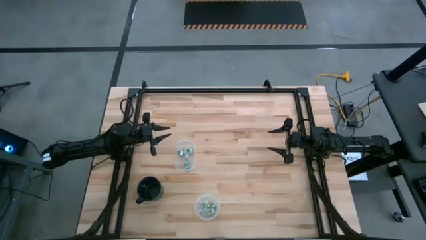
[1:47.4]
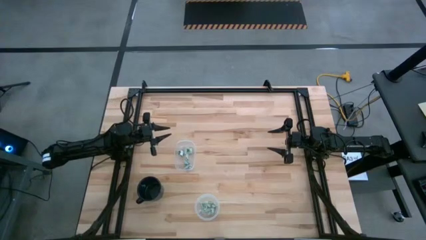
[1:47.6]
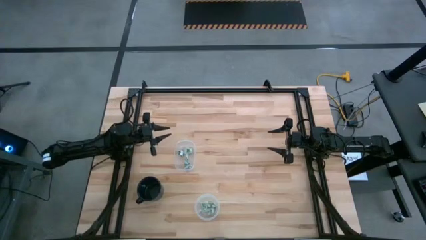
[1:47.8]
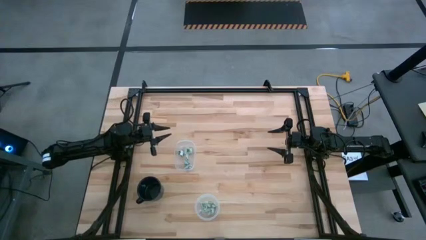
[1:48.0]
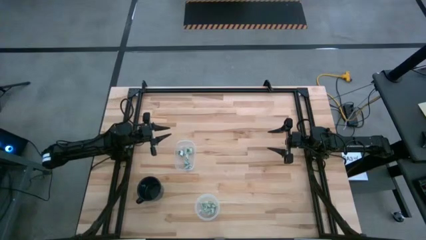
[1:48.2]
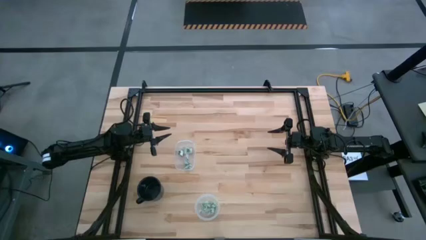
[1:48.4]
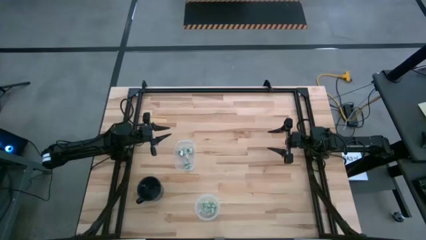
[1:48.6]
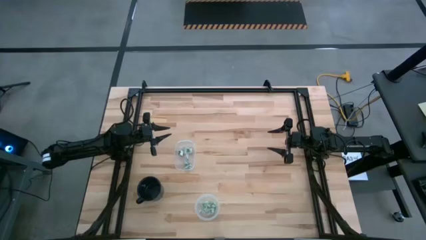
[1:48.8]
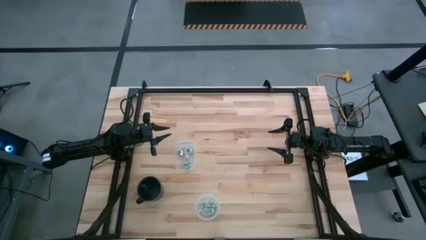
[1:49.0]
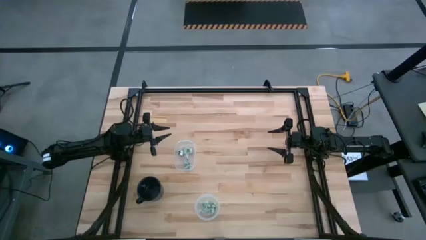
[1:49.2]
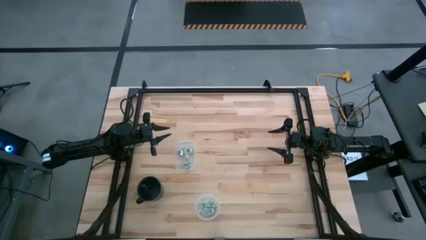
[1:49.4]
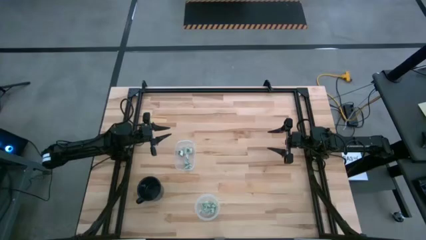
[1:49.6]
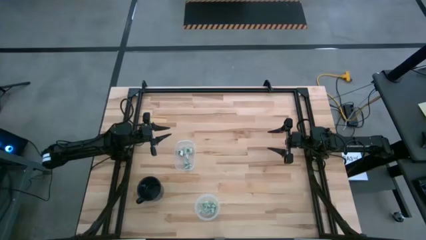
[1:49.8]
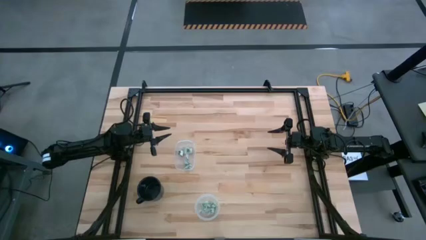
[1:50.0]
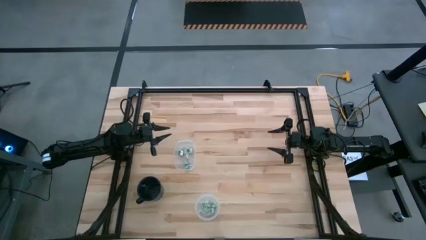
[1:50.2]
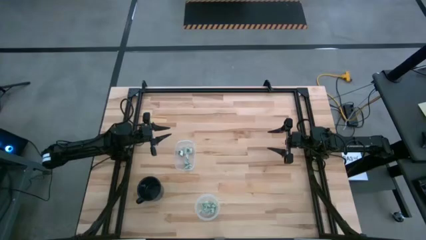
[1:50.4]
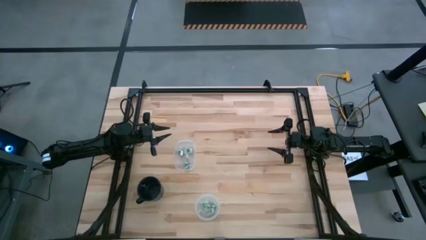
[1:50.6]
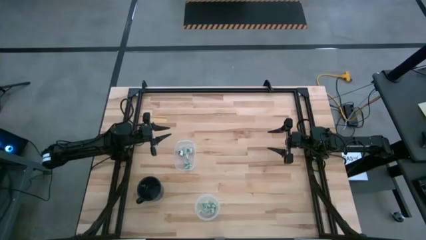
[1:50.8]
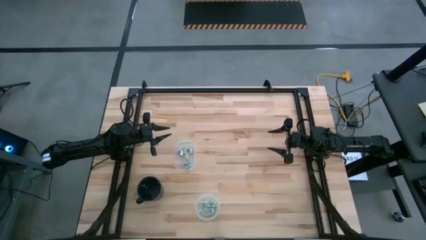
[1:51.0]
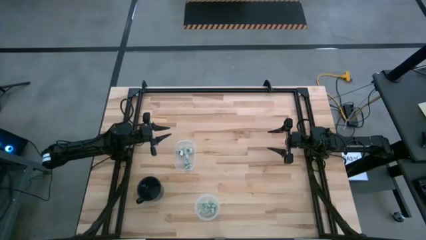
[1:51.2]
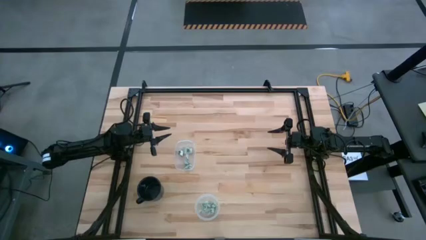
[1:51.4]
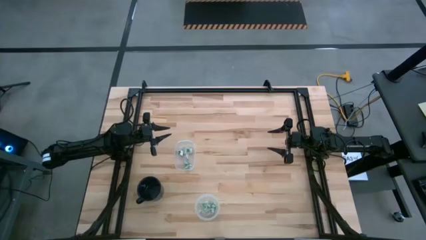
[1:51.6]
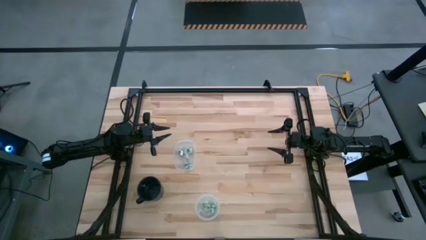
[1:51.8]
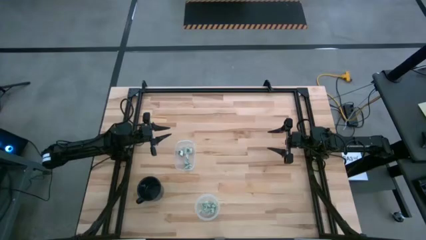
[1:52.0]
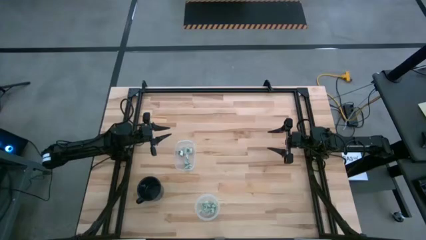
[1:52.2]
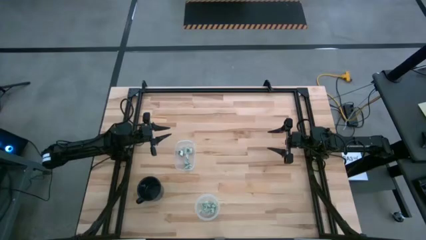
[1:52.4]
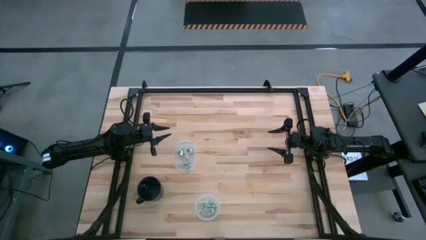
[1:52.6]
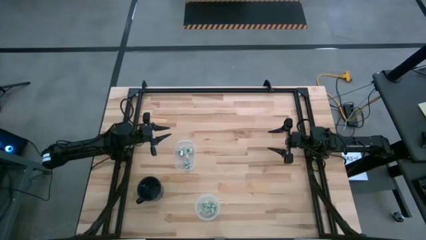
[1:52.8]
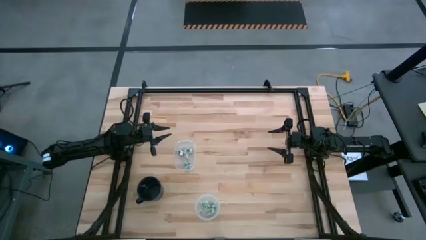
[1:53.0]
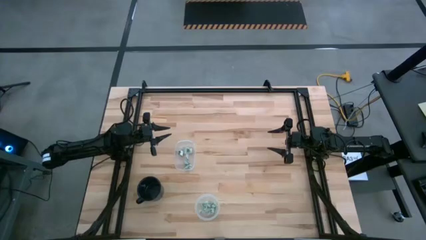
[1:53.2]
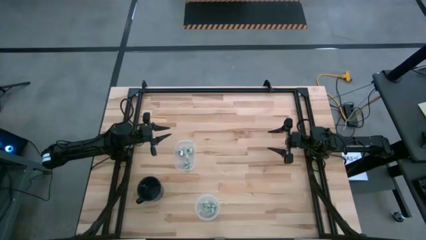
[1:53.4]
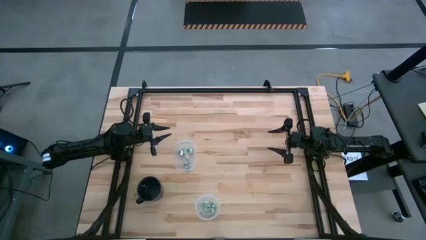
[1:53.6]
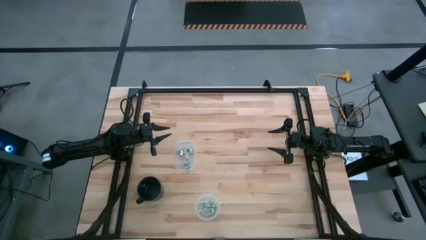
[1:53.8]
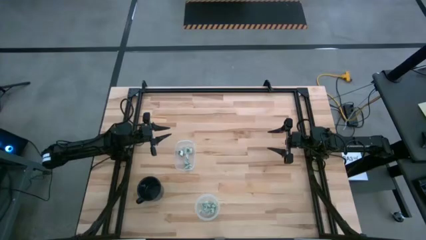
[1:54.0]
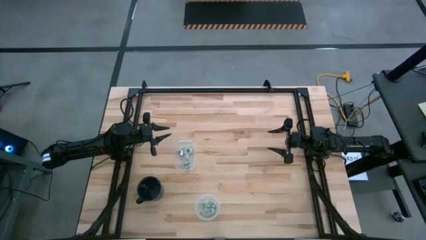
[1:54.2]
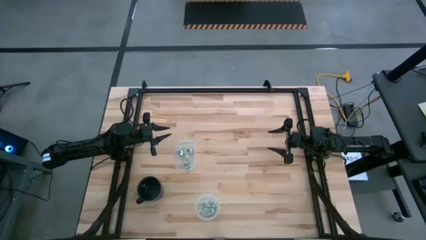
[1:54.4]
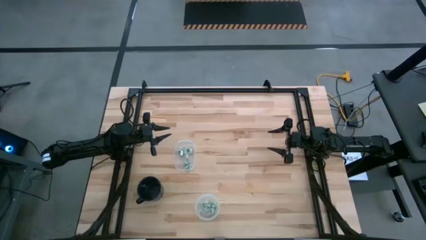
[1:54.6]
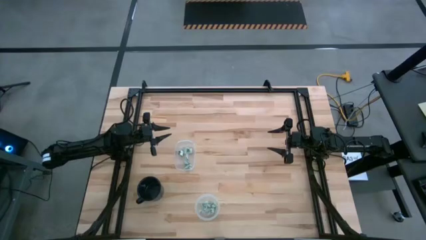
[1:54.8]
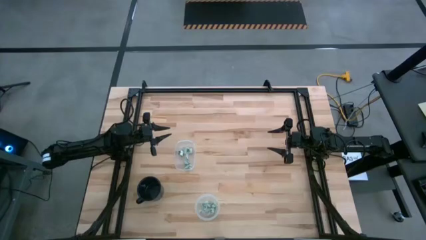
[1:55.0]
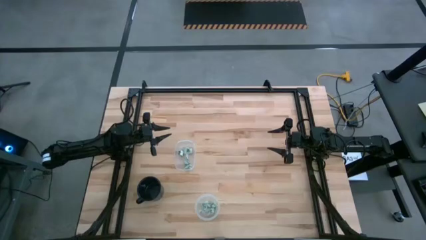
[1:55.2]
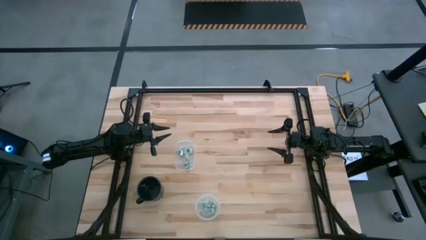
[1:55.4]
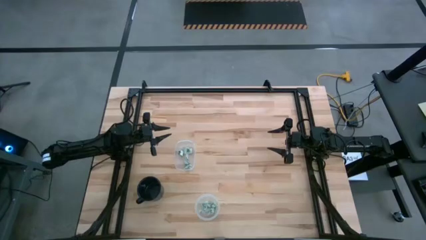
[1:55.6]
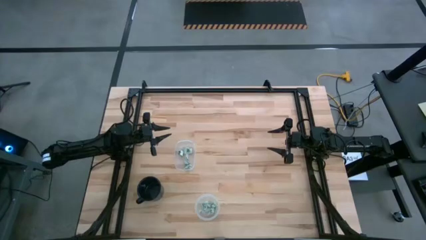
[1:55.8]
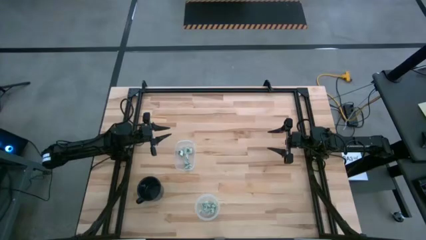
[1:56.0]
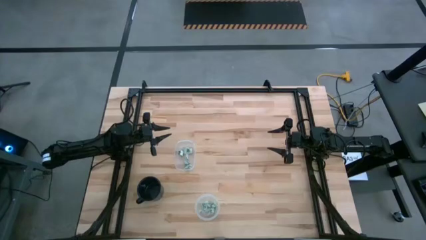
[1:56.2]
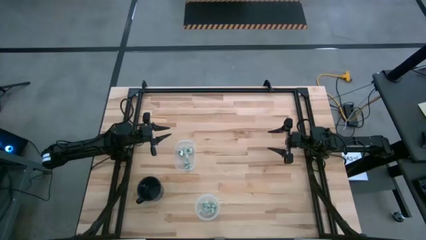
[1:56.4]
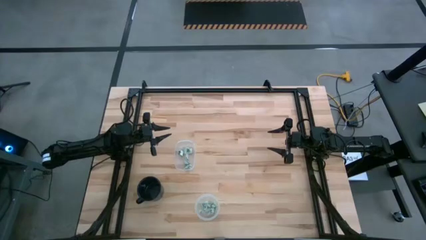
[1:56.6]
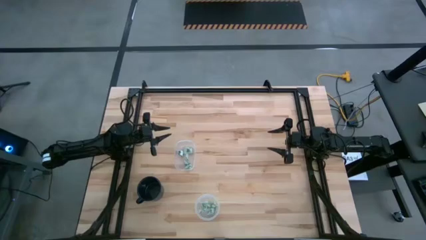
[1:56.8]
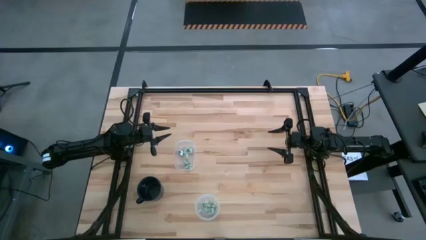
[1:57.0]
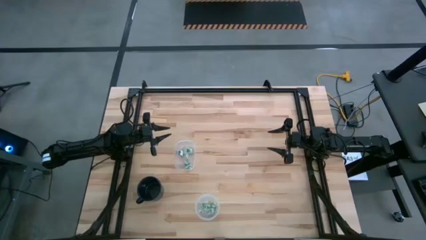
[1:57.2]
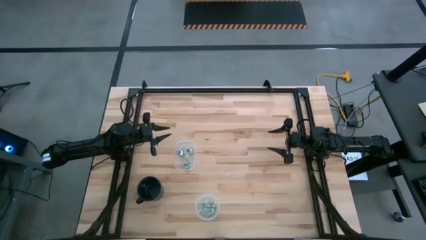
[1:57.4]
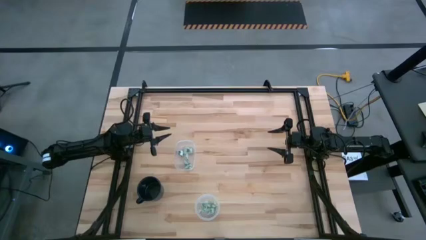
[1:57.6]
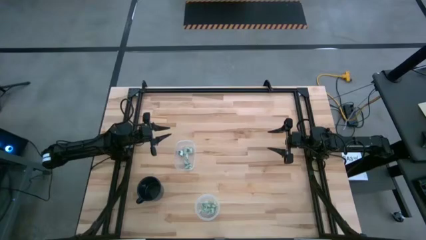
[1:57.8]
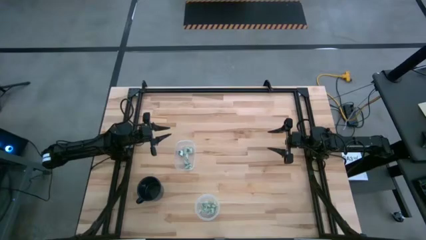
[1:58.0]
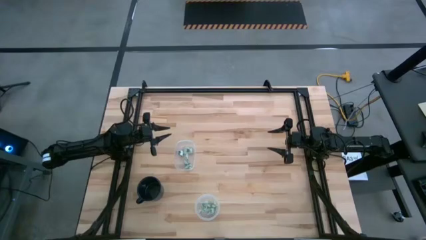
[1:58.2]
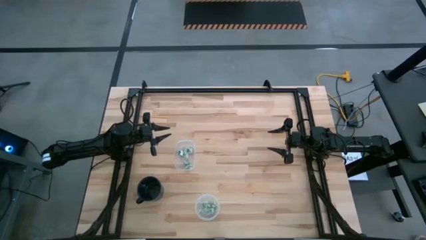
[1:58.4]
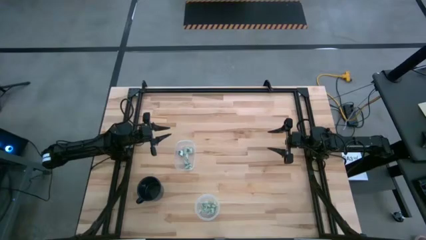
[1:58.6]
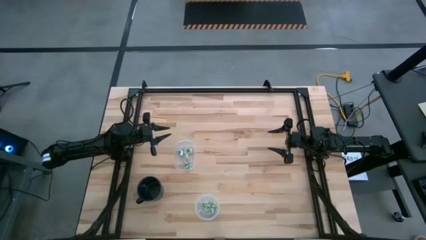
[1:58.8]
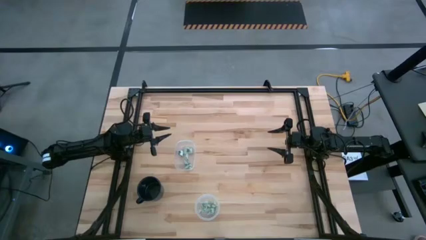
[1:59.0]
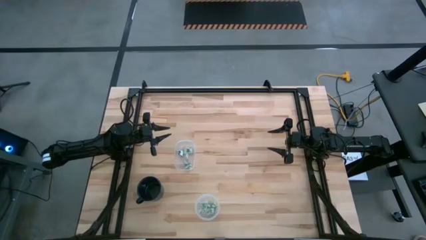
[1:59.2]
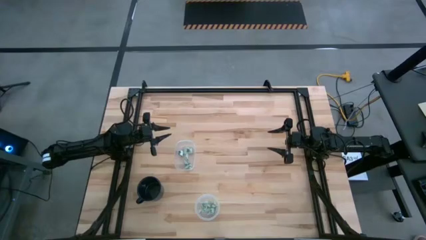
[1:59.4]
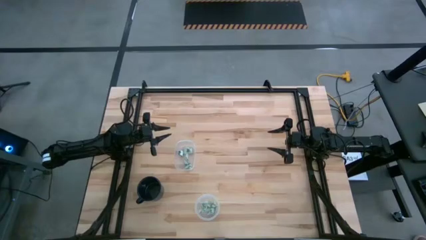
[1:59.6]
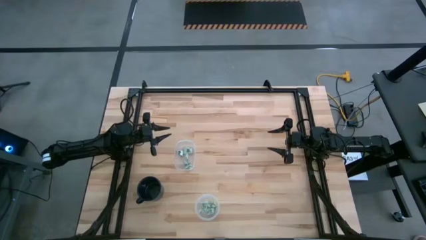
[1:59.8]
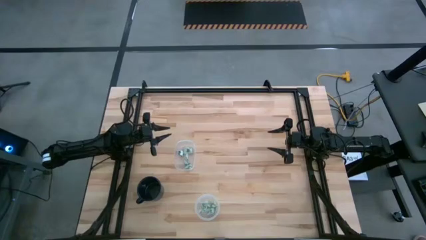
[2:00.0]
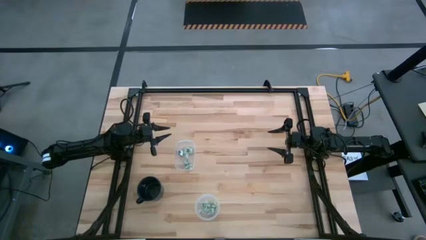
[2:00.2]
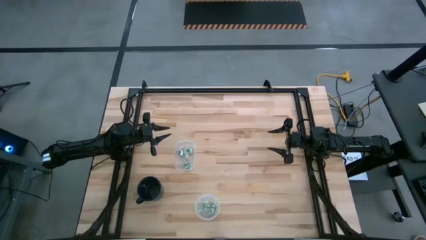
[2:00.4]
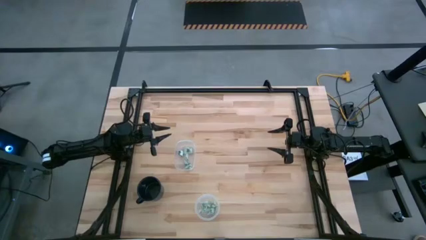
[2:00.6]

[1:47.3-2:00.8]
Task: Pick and place Stevia / Truvia into bins
Return to Home Position
